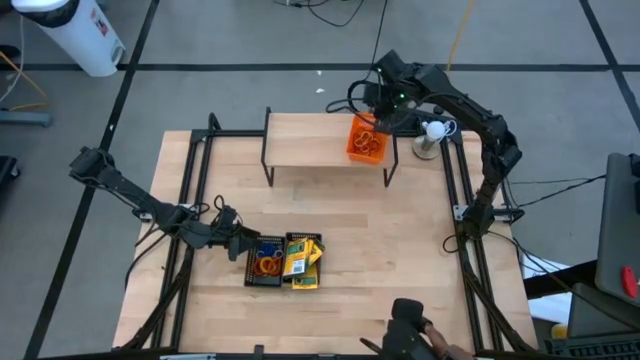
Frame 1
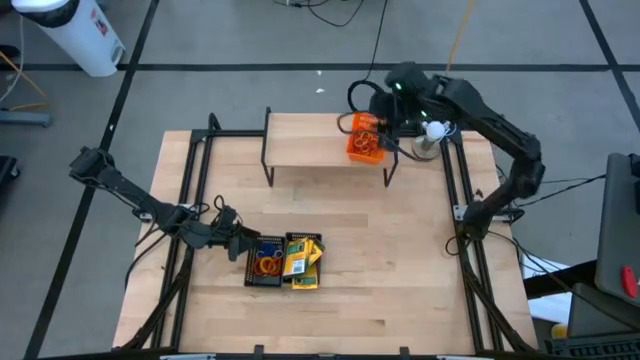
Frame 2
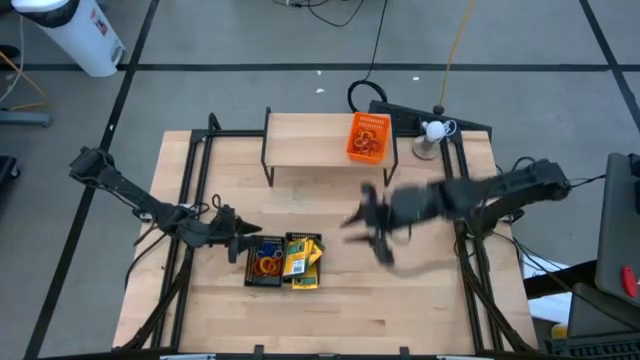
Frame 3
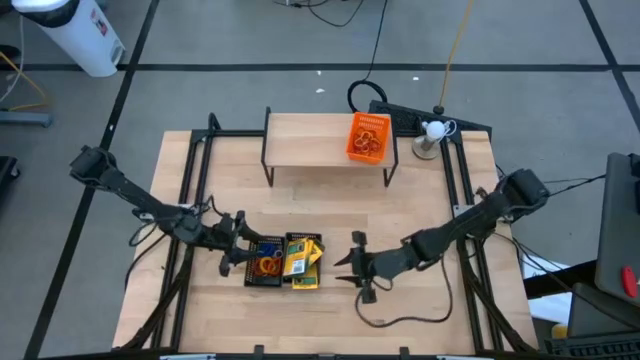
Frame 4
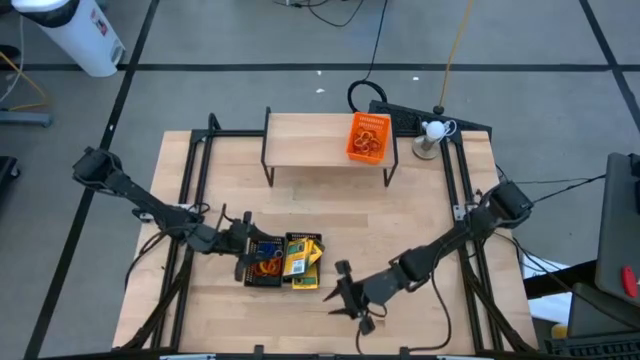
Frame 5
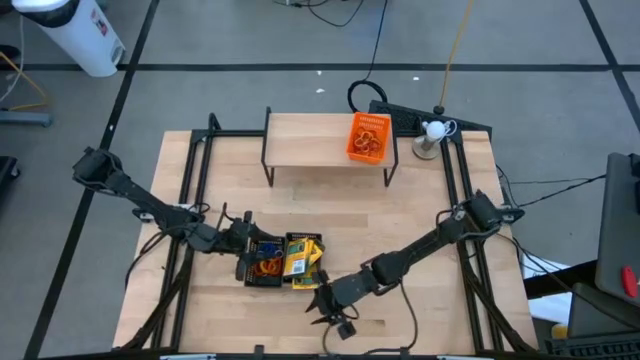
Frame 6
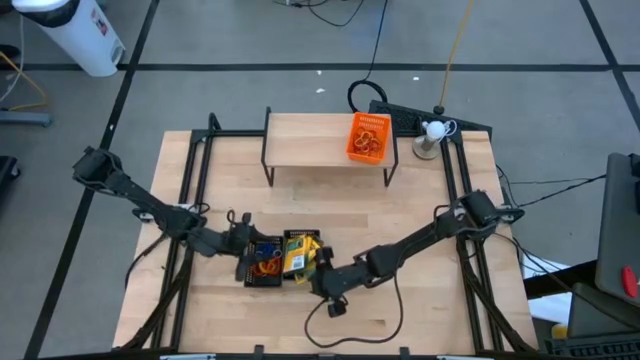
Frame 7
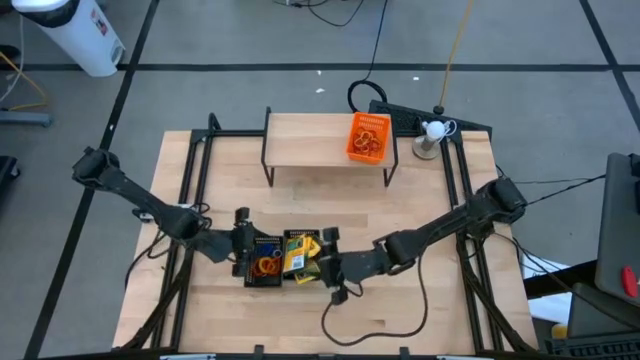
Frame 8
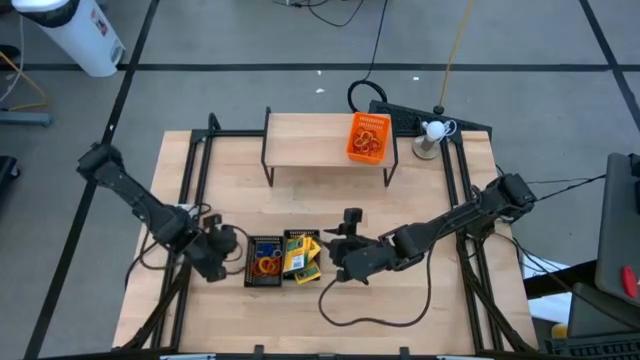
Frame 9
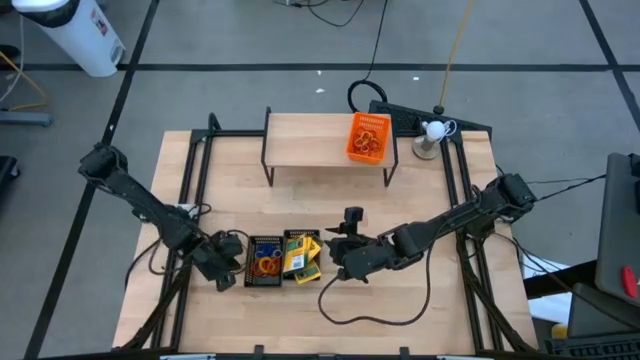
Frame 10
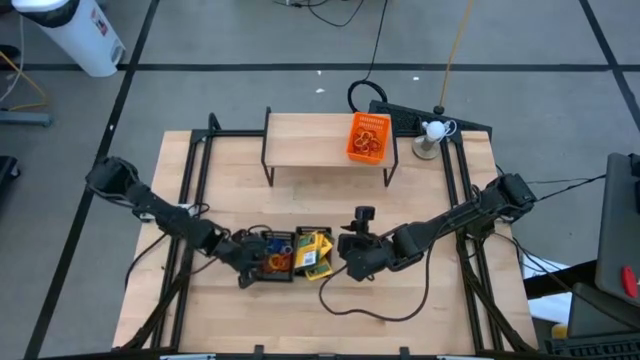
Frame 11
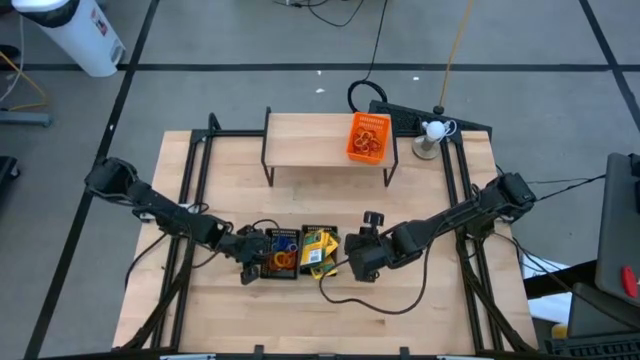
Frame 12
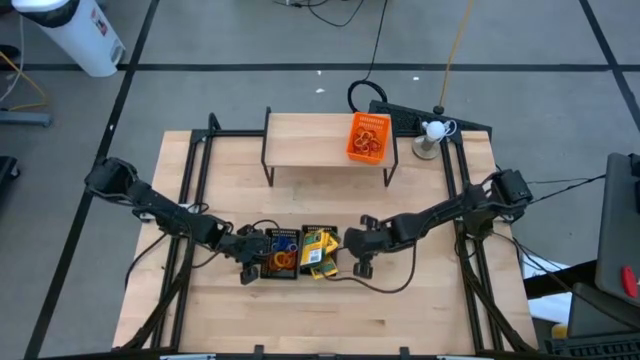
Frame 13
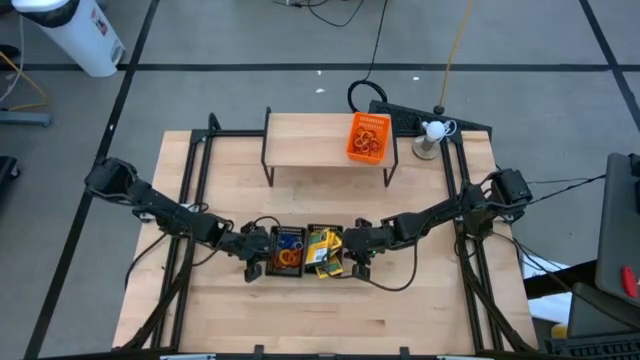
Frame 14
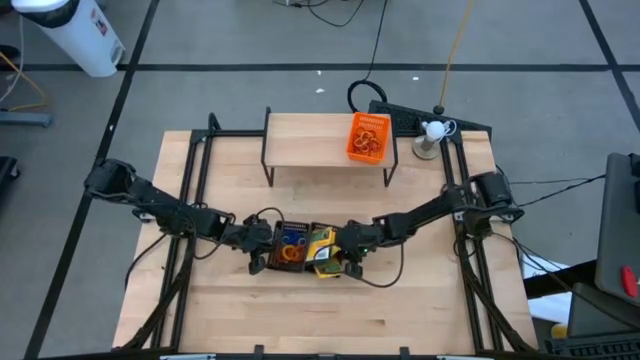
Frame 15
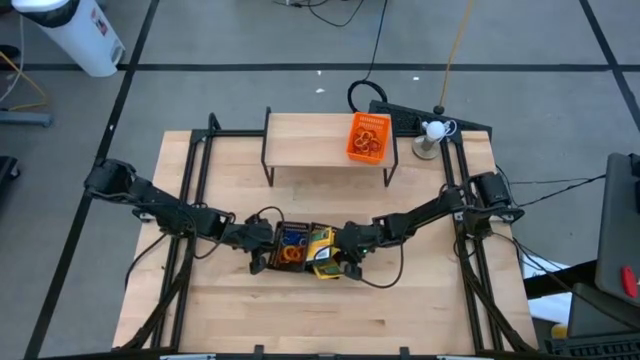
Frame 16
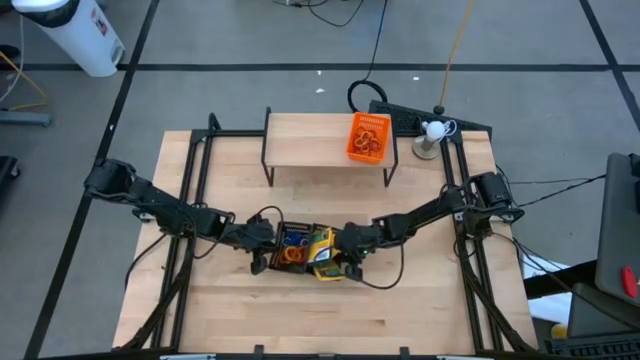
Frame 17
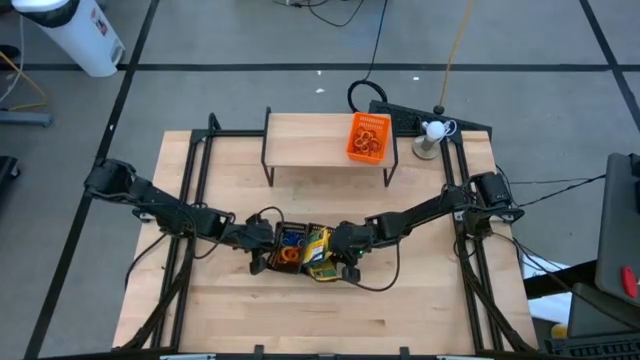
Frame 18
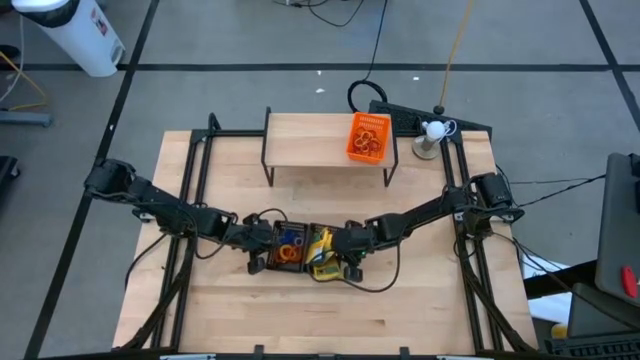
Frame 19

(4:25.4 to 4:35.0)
Task: Pick & Place Office Desk Supplies
Adjust the black bins

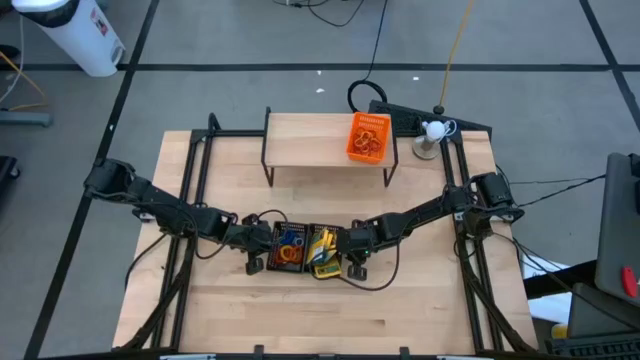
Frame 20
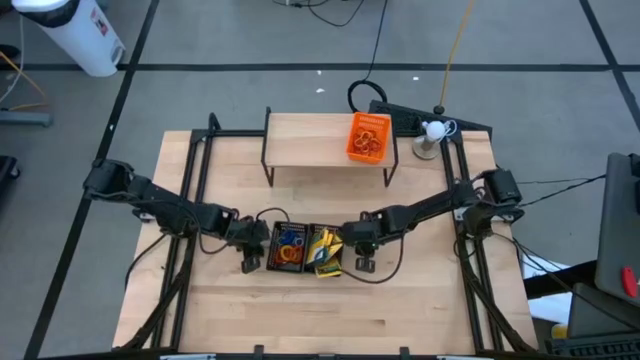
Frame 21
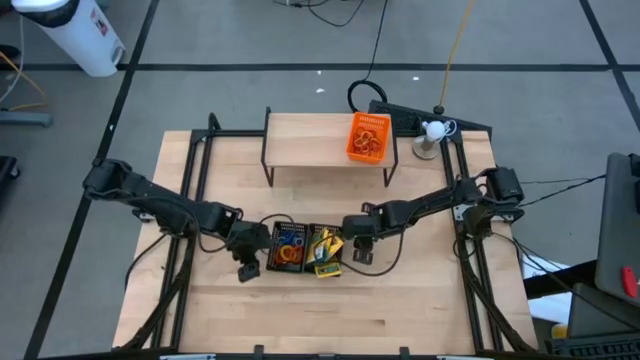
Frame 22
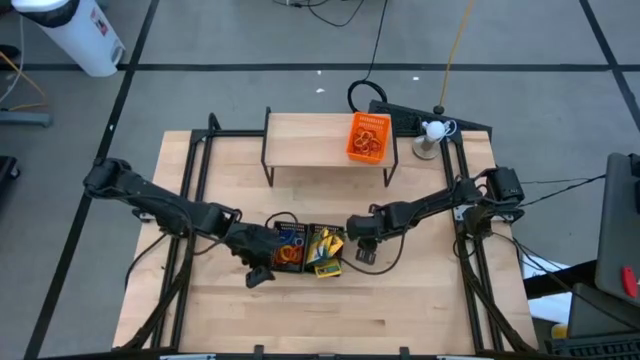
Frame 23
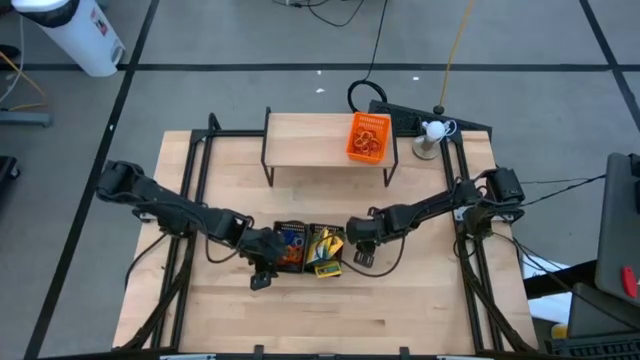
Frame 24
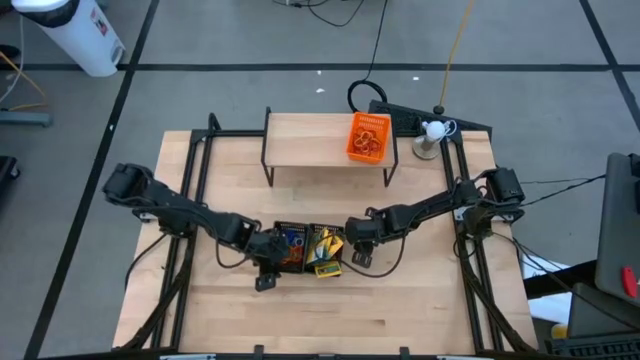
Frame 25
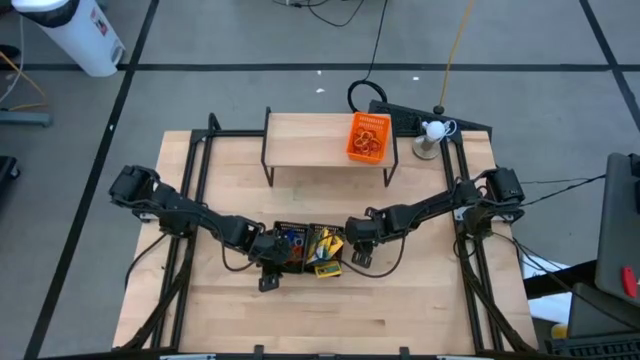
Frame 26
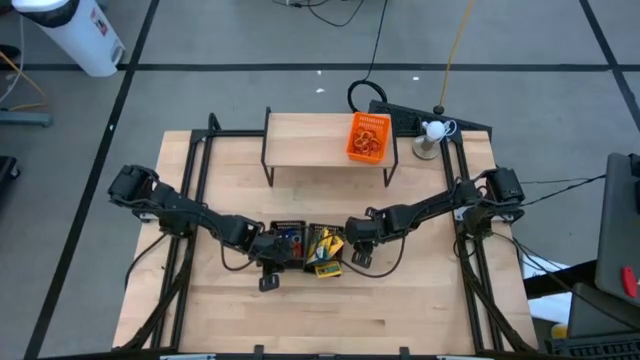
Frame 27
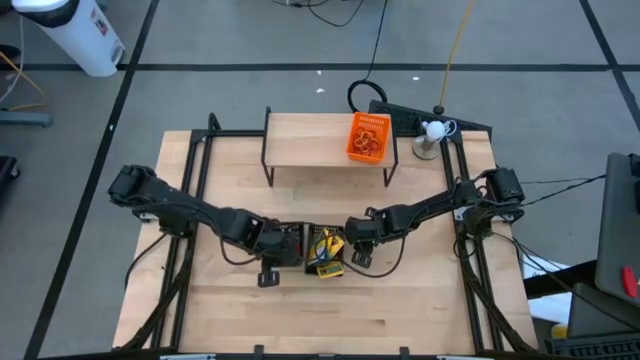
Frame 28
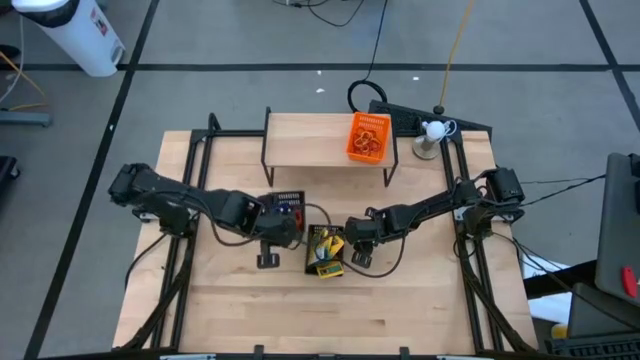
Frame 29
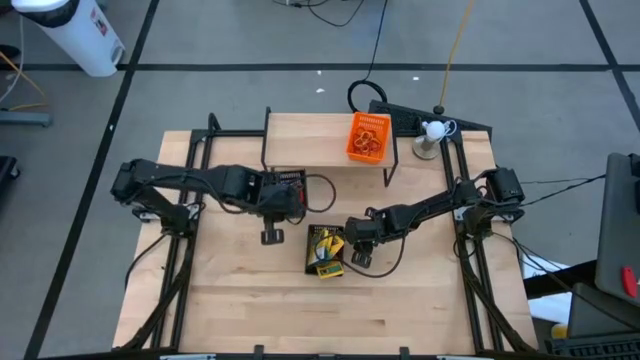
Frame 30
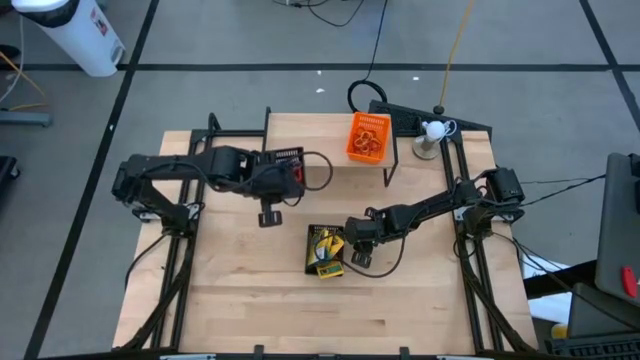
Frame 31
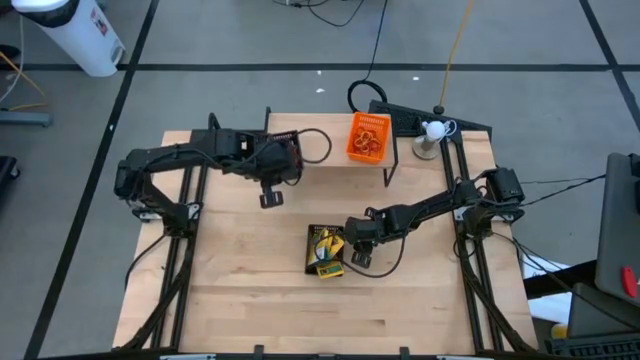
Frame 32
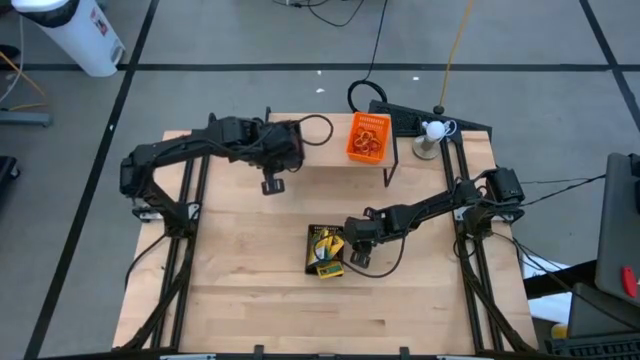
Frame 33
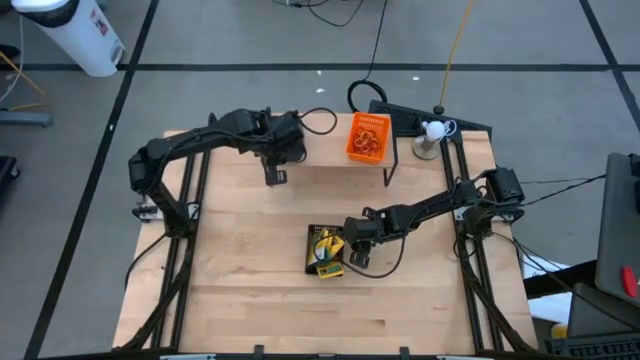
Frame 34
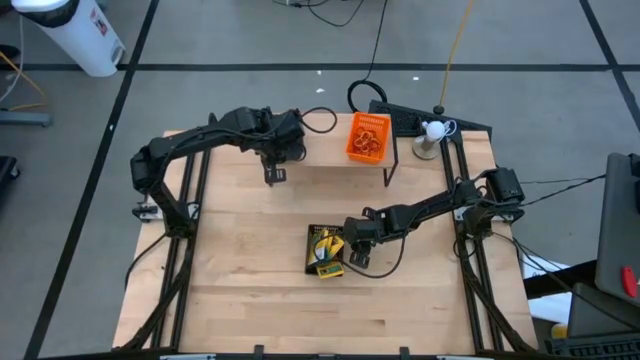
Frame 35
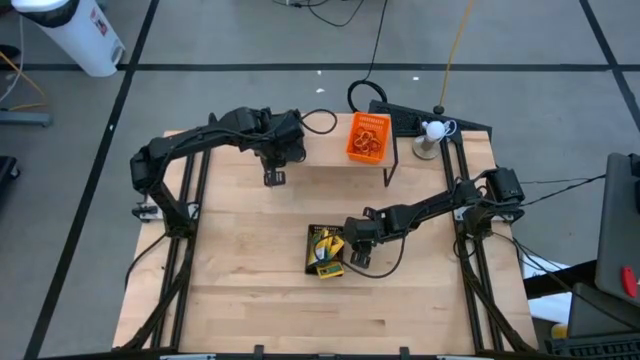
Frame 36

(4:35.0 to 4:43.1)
Put the left black bin with spring keychains on the shelf

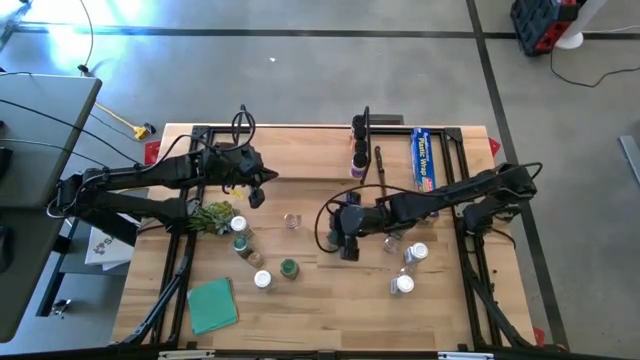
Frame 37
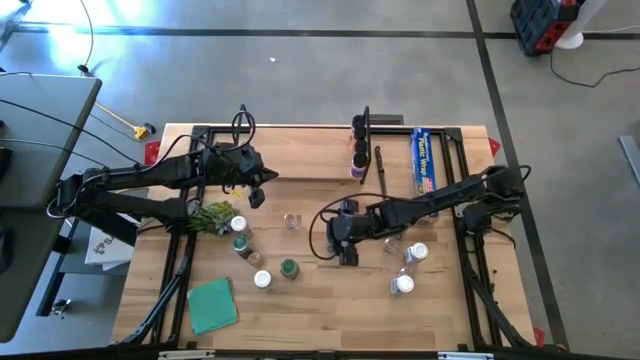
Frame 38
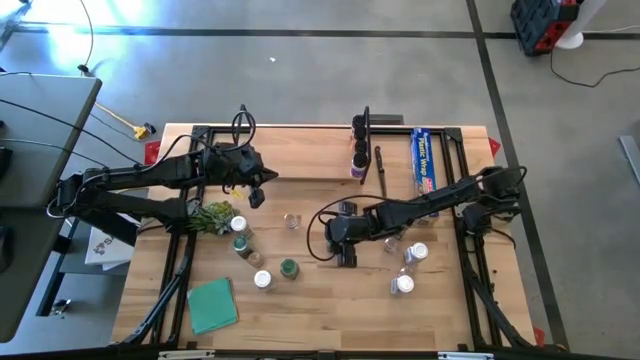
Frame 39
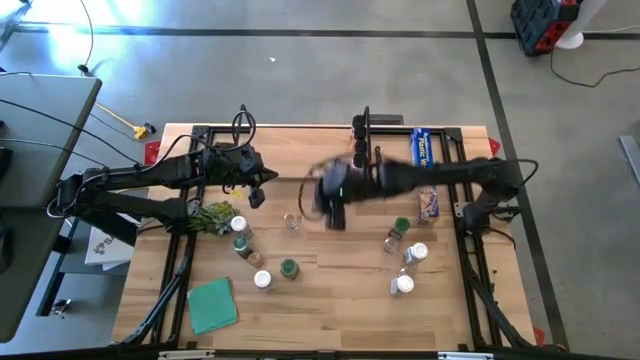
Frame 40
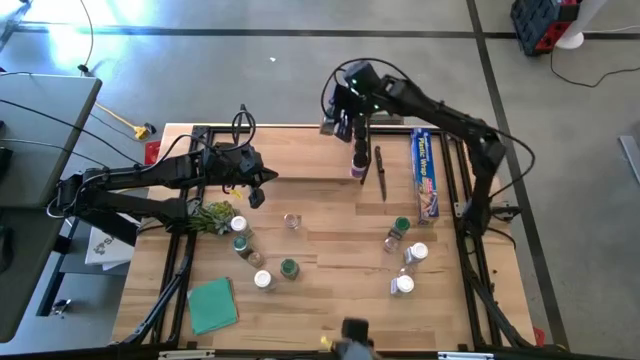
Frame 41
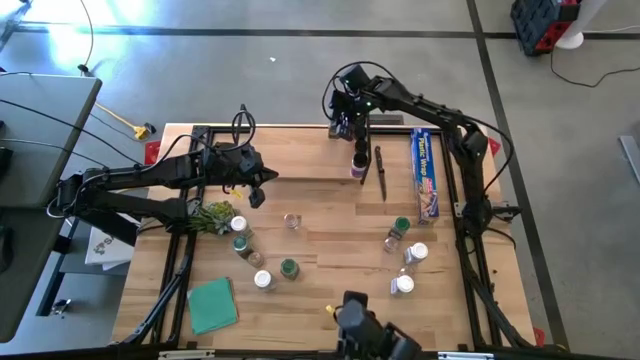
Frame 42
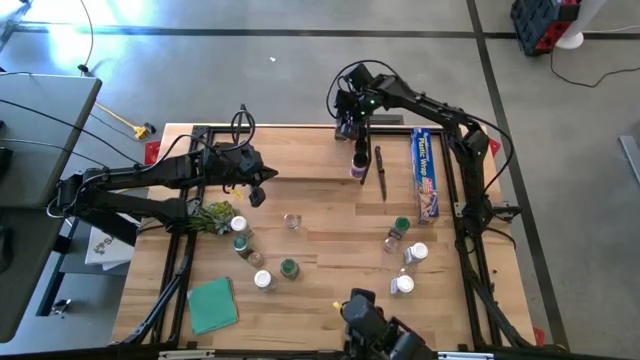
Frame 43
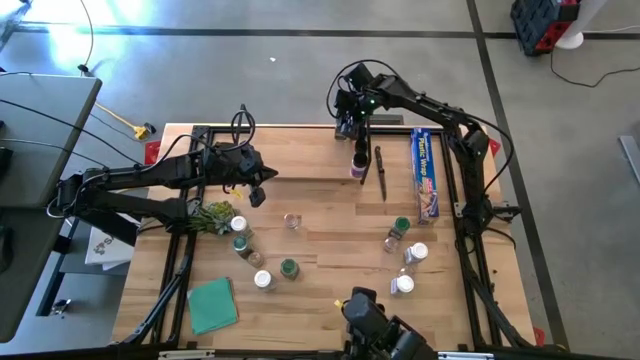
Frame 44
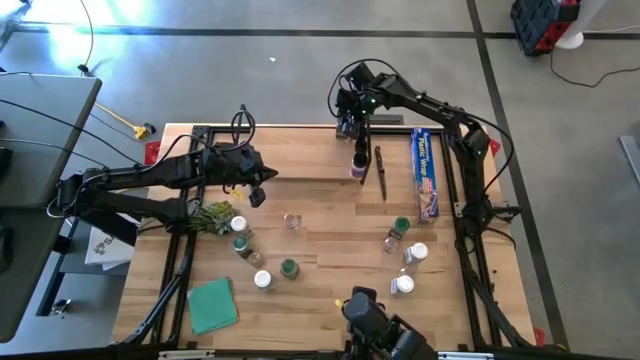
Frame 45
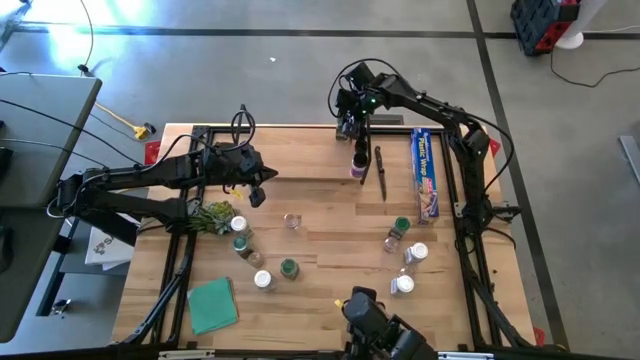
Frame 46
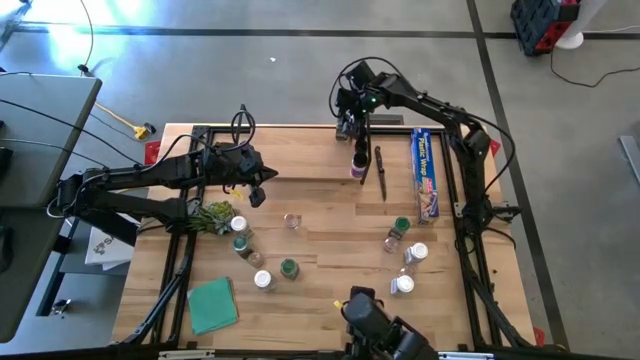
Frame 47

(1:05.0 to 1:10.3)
Task: Shelf spices
Put the green seasoning bottle on the shelf
